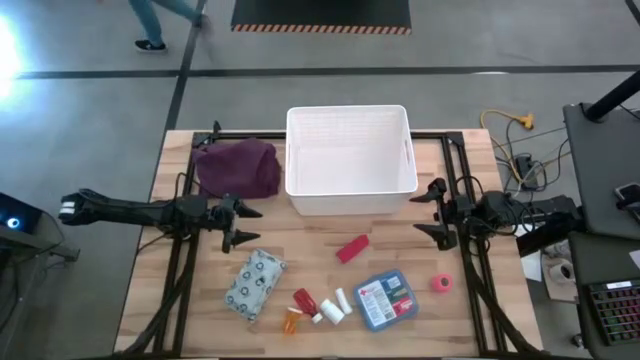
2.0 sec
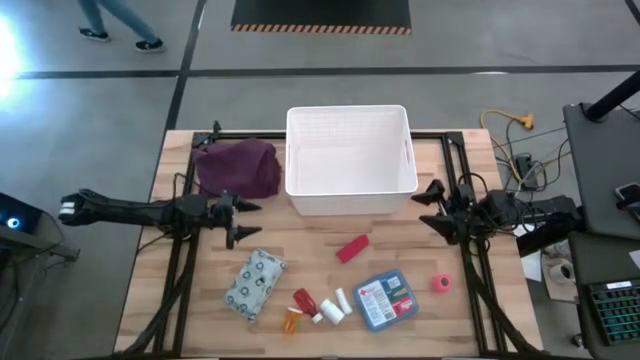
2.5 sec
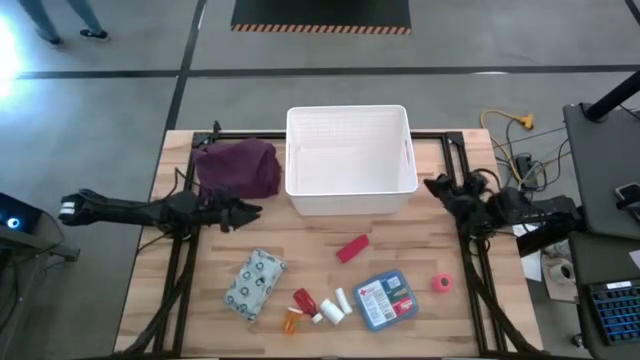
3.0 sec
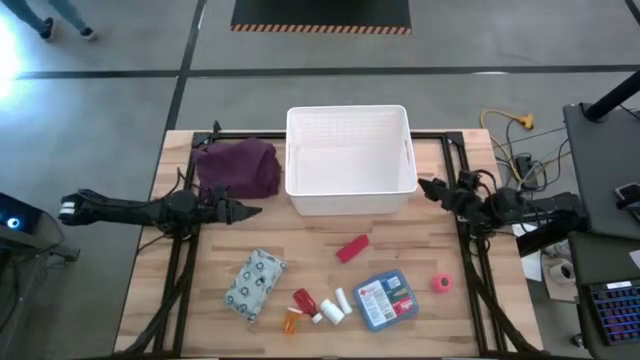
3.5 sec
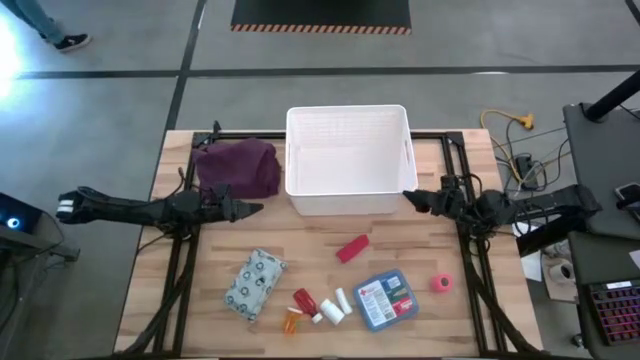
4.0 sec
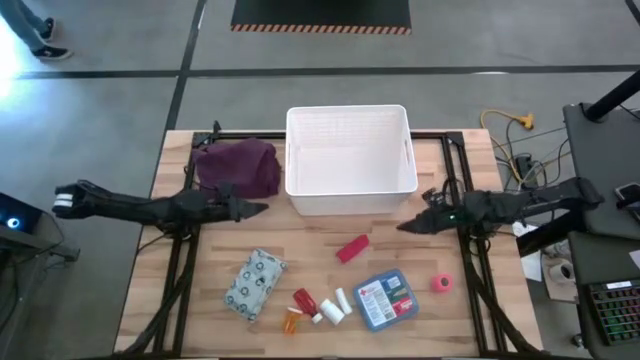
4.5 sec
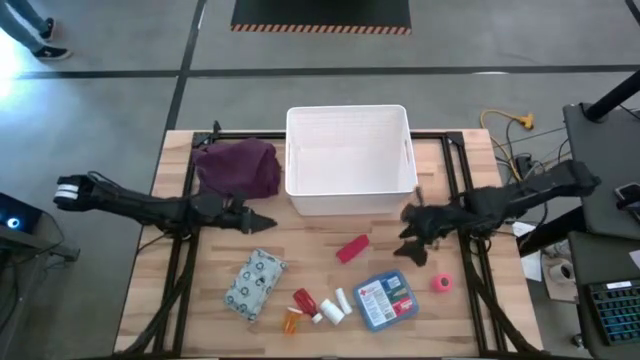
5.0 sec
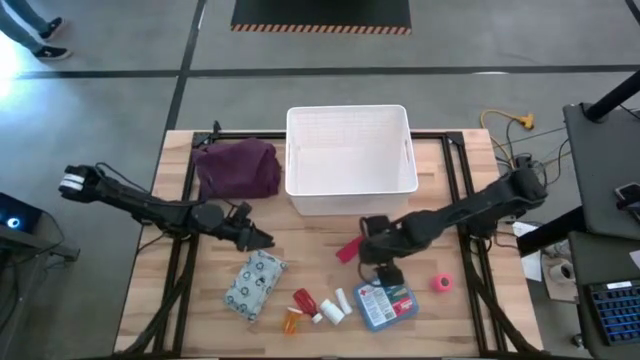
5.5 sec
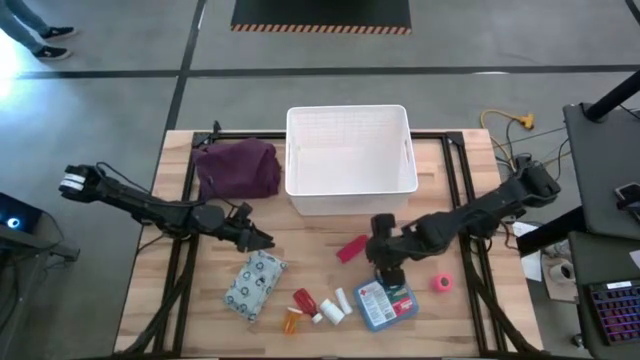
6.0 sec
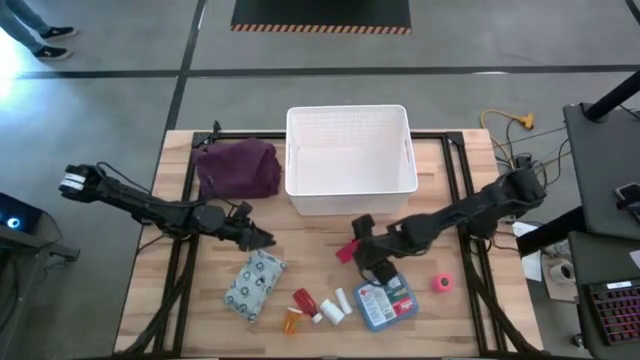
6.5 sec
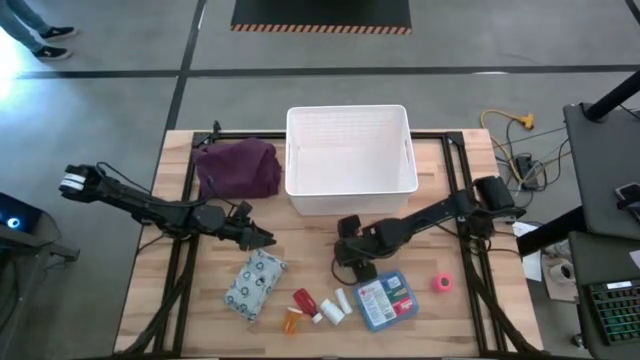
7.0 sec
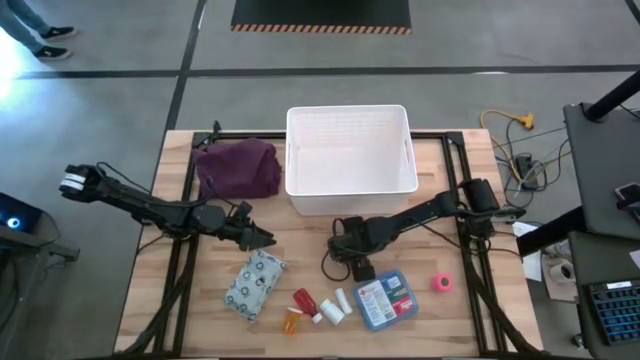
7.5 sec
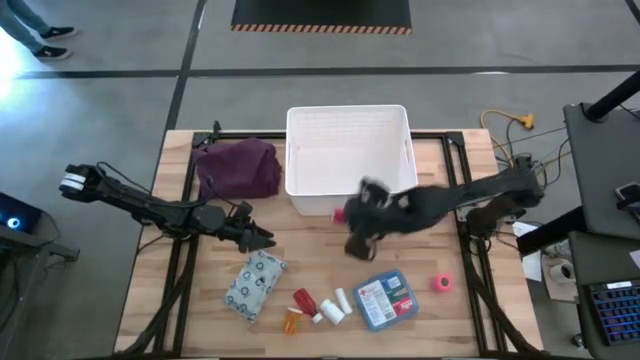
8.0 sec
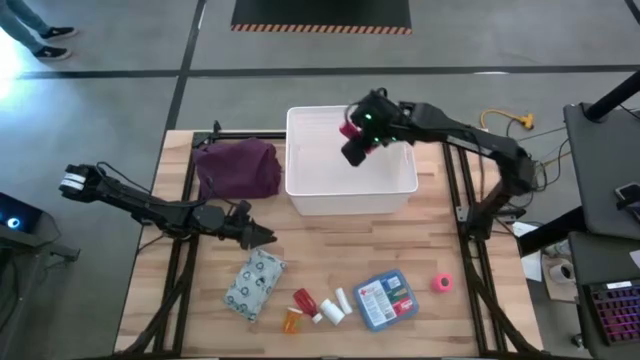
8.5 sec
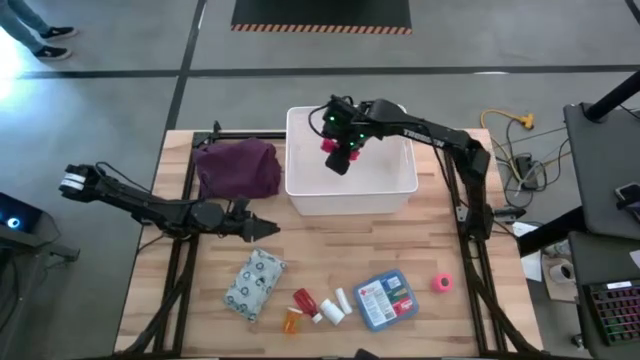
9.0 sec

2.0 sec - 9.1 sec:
Task: Pick & place medical supplies in basket/bin
Put the red bandage into the white bin

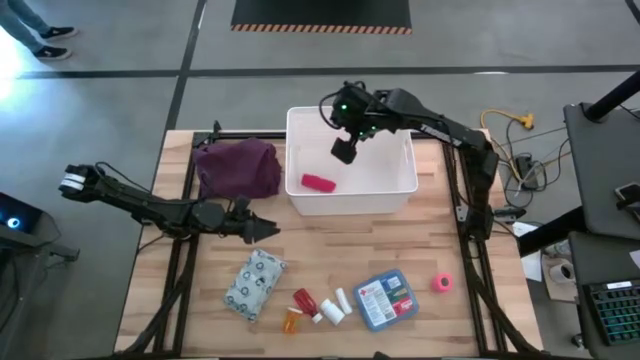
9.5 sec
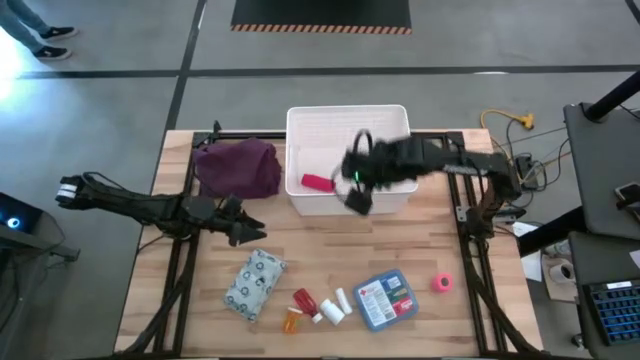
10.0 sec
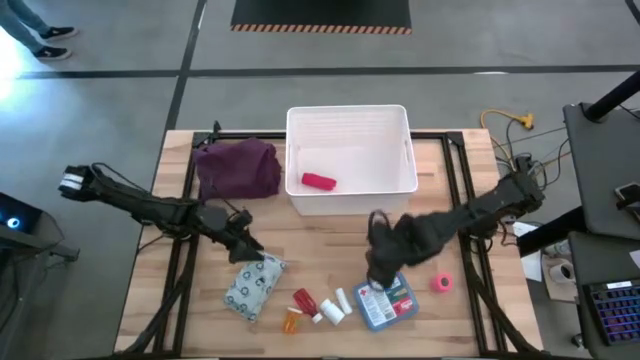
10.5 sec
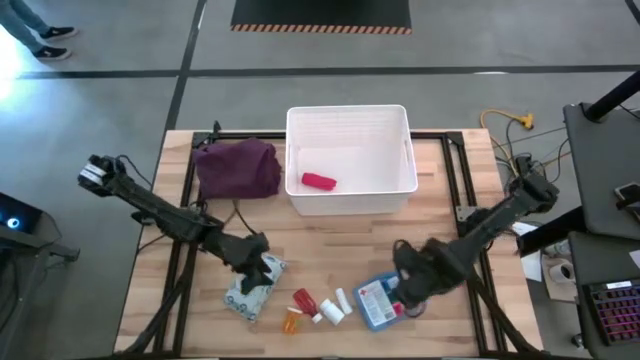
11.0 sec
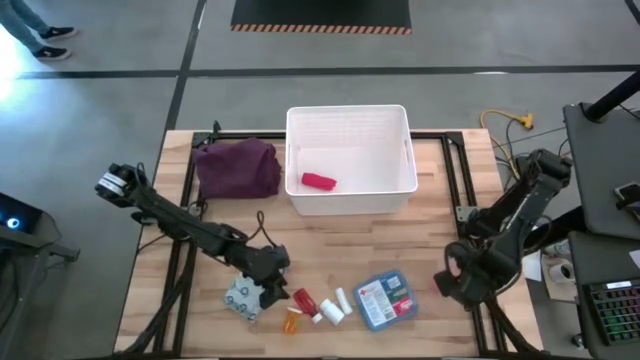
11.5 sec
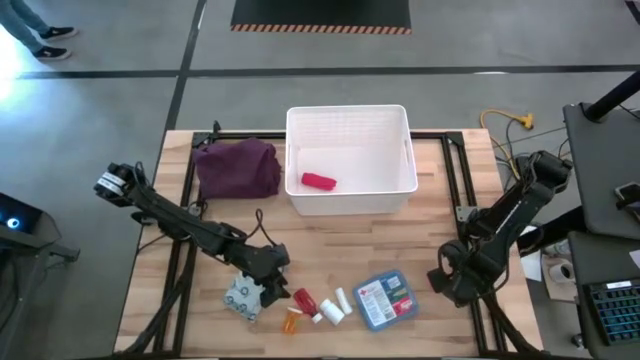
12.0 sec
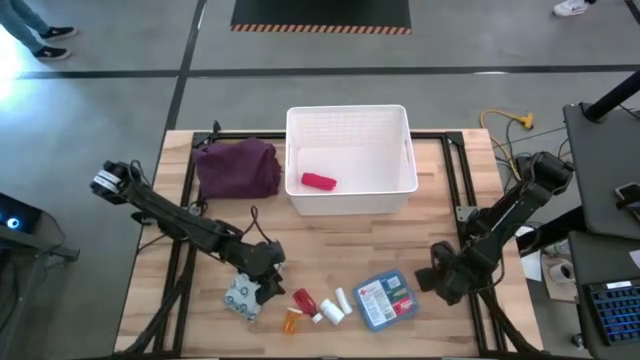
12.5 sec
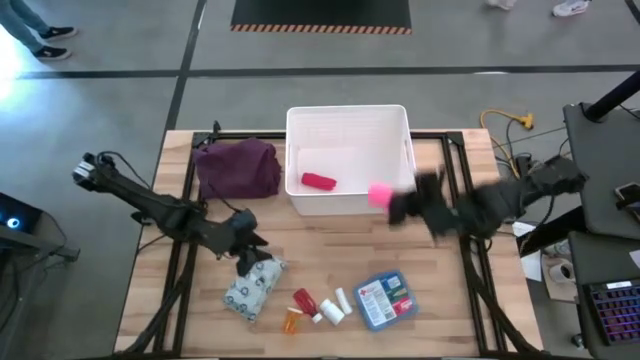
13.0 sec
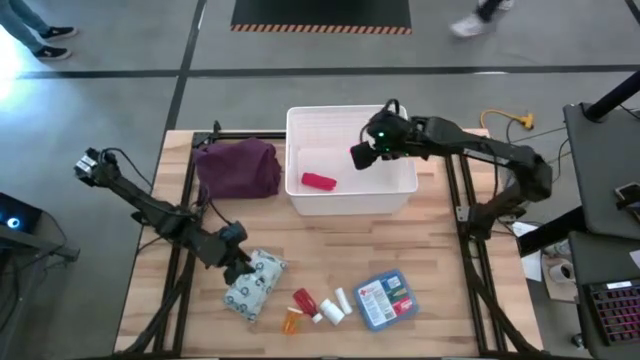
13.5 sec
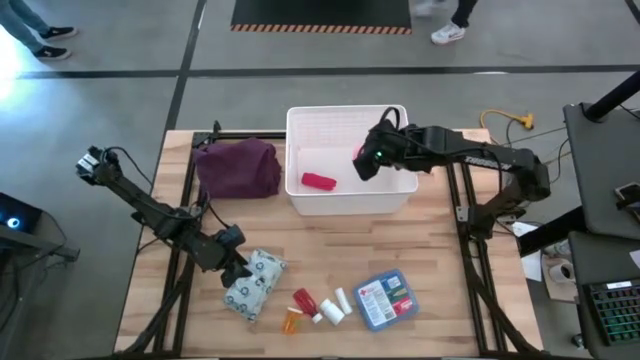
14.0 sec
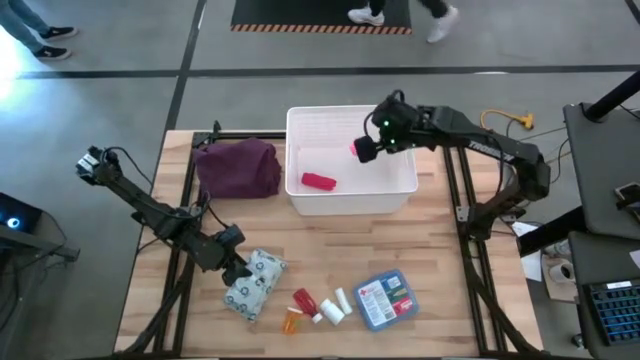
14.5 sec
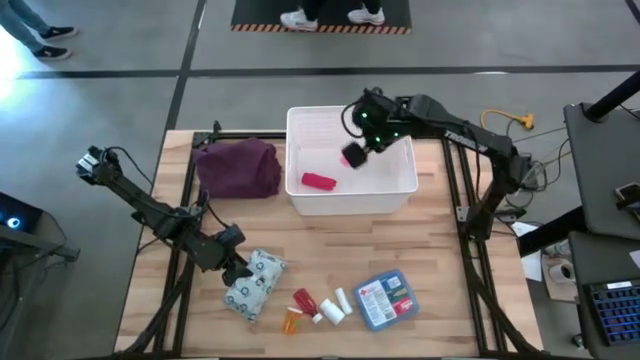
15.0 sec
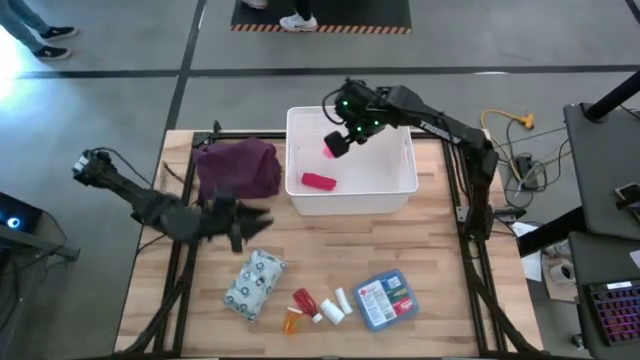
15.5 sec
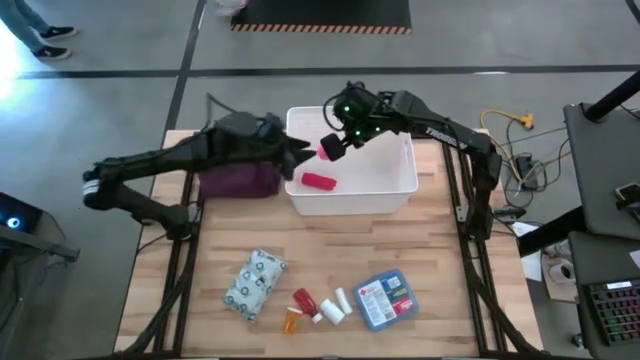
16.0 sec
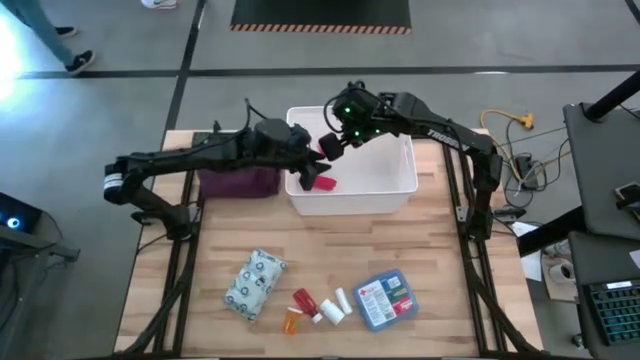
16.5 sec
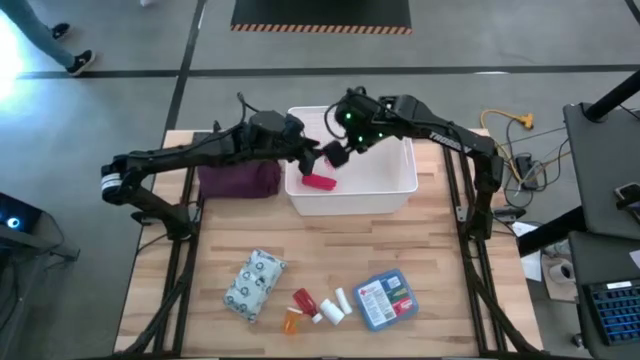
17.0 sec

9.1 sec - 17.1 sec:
Put the pink bandage into the white bin

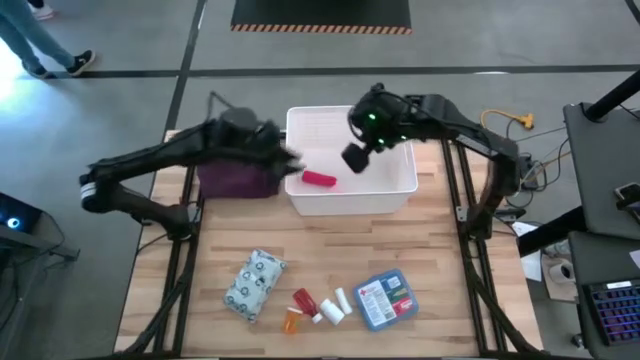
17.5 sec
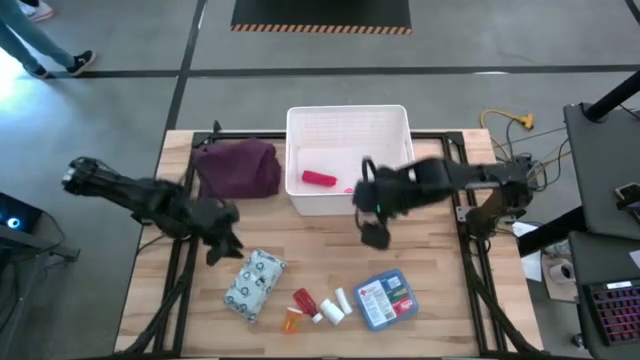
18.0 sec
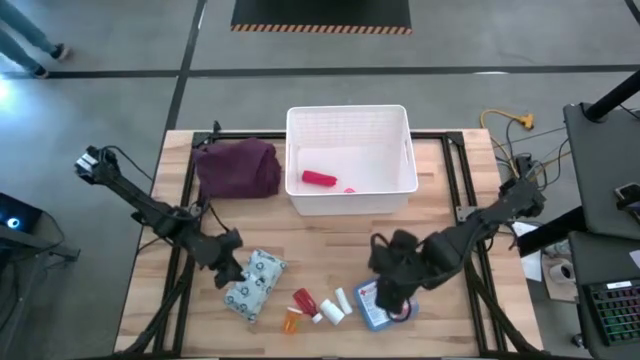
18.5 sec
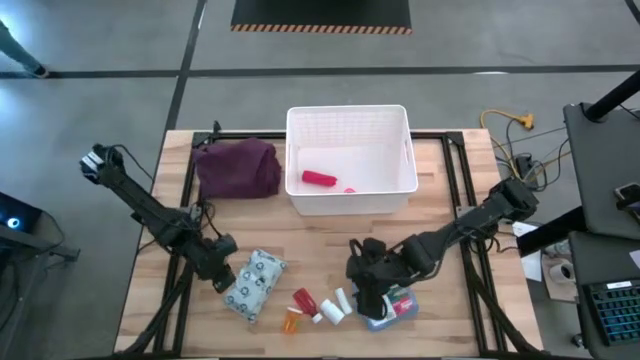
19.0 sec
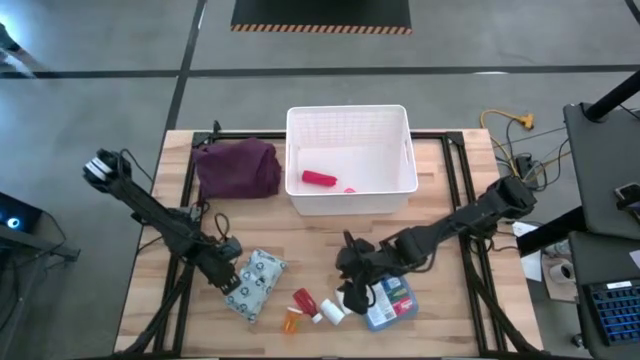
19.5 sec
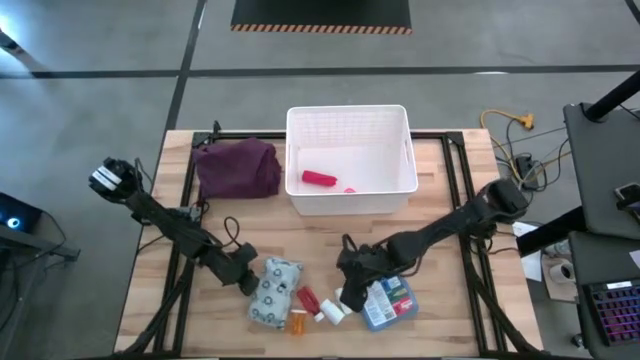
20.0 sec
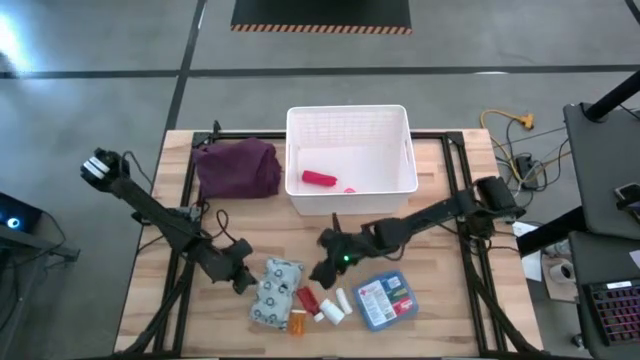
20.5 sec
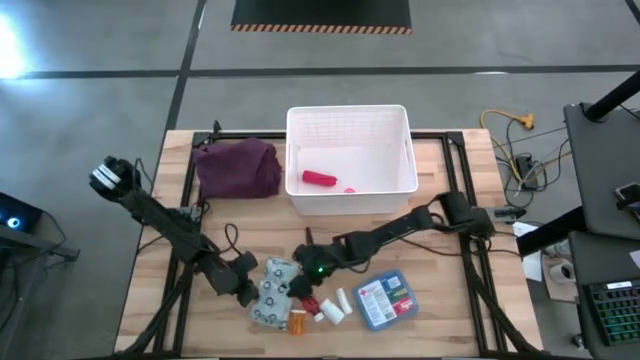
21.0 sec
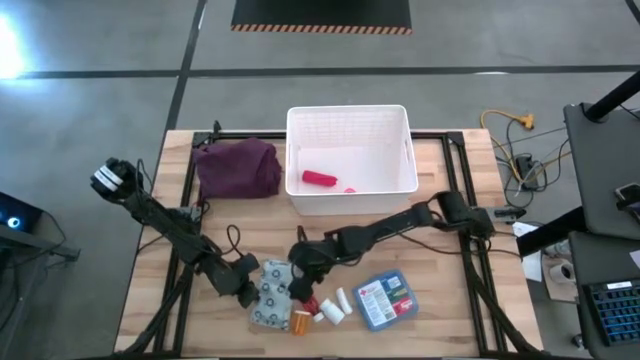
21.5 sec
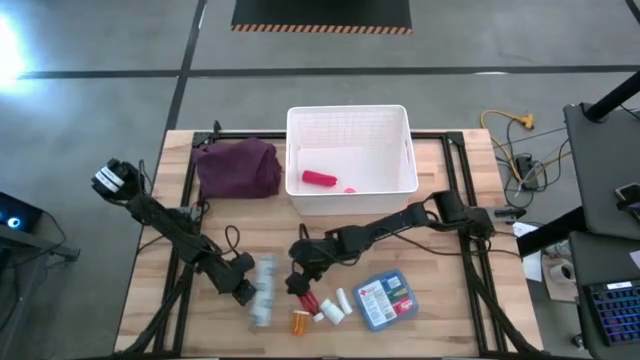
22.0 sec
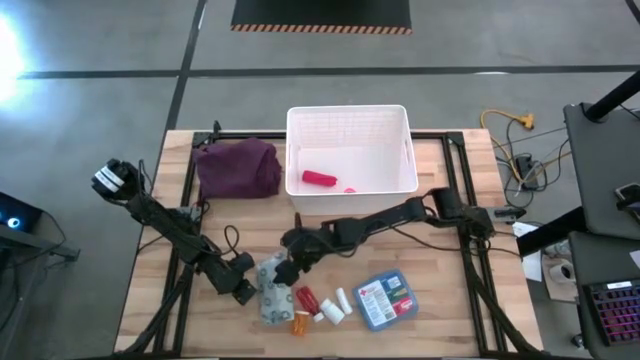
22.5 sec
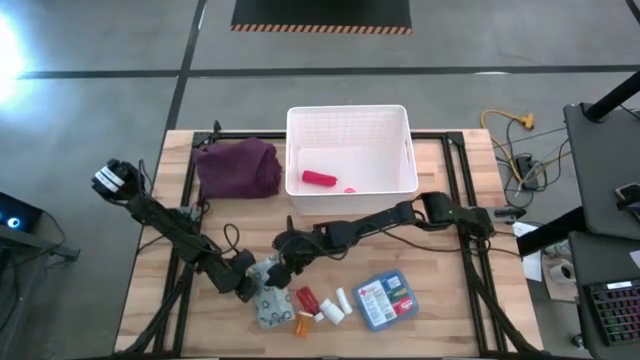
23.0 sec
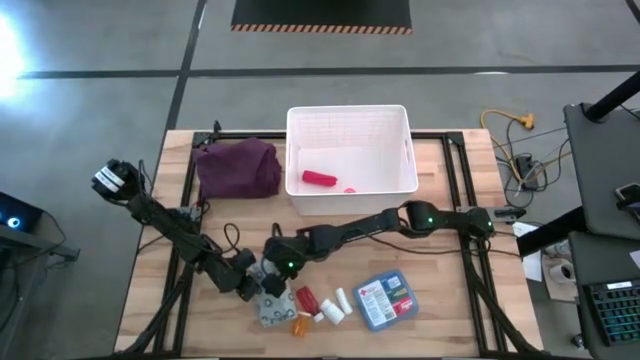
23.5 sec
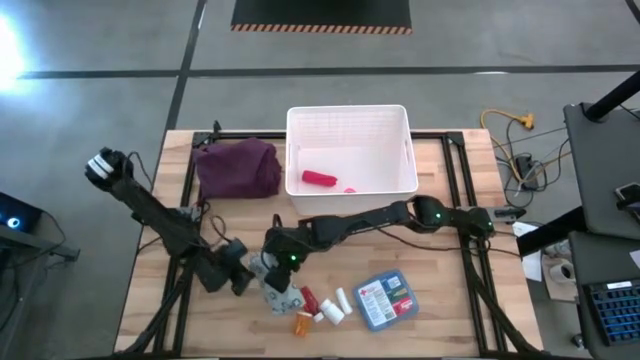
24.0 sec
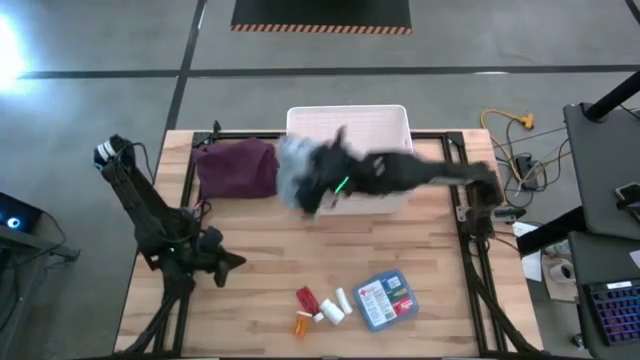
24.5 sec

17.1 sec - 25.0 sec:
Put the white mailer bag into the white bin

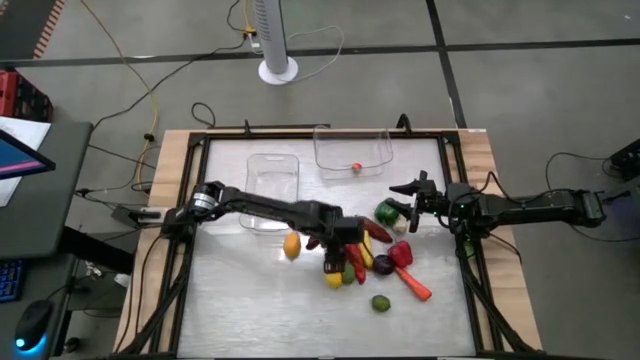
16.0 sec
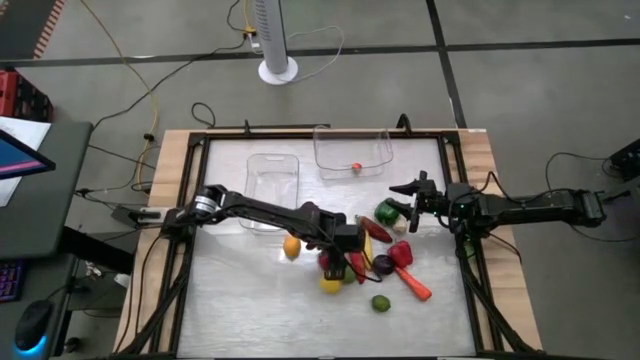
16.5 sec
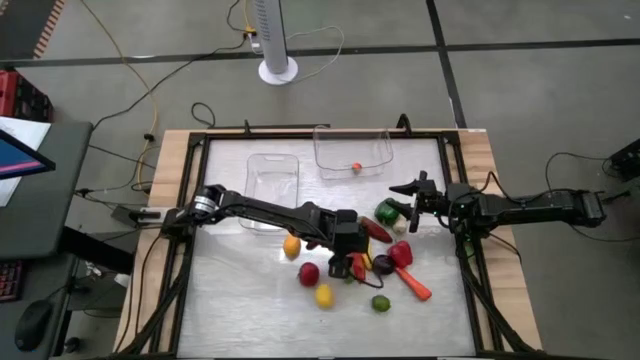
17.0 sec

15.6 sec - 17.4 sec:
Task: Sort produce into baskets
Put the red tomato into the right transparent bin
